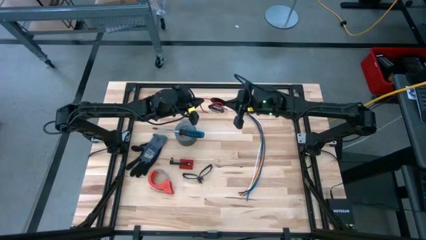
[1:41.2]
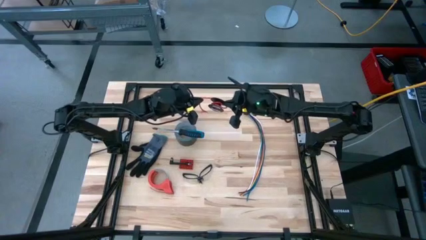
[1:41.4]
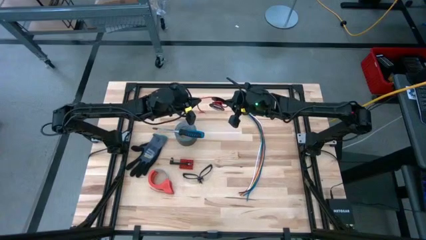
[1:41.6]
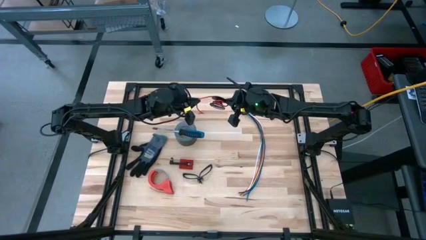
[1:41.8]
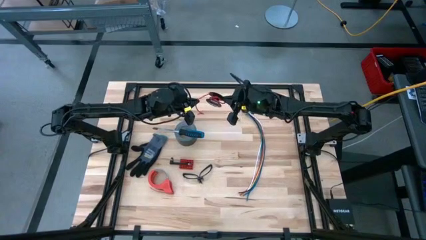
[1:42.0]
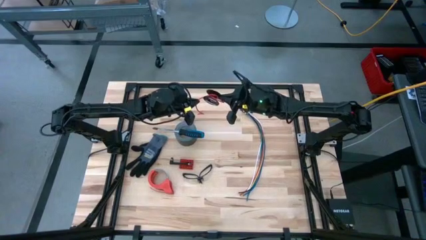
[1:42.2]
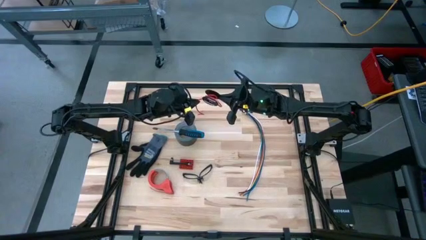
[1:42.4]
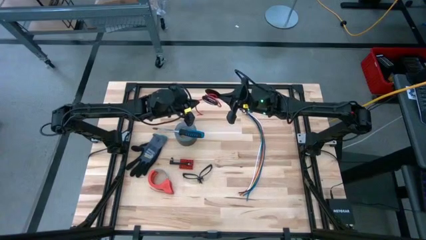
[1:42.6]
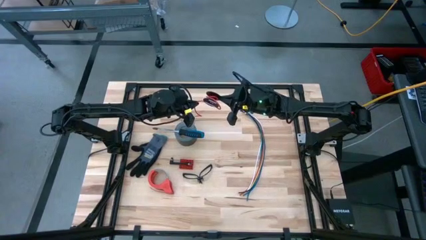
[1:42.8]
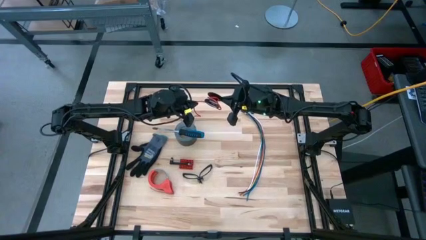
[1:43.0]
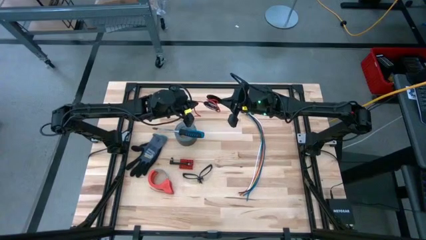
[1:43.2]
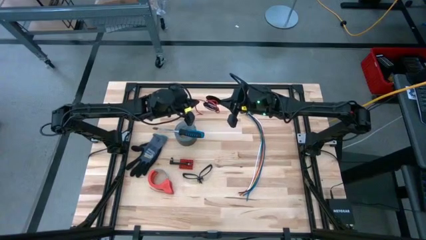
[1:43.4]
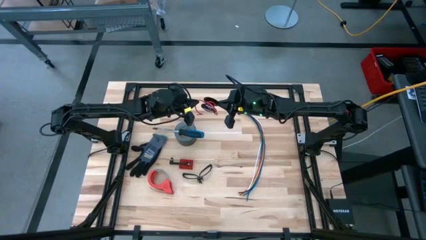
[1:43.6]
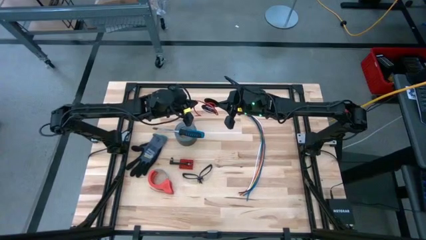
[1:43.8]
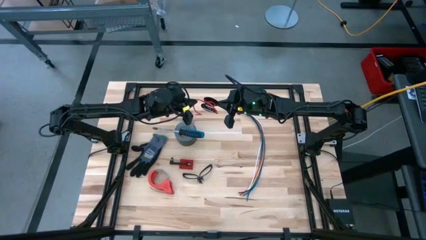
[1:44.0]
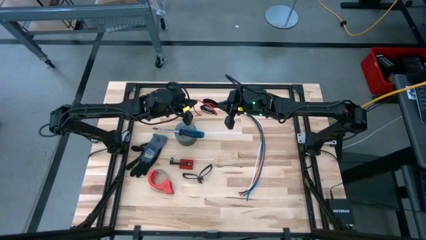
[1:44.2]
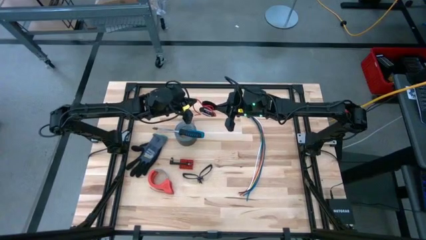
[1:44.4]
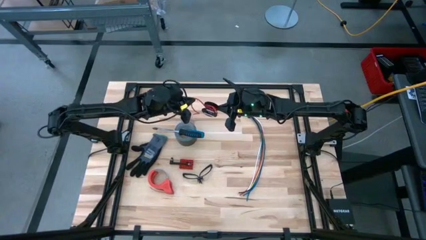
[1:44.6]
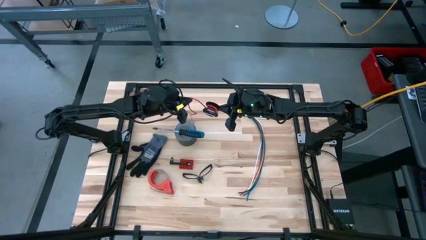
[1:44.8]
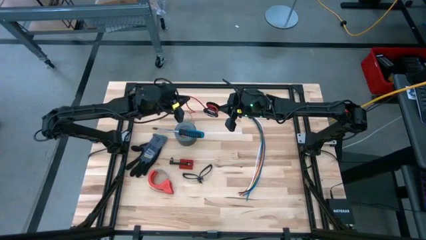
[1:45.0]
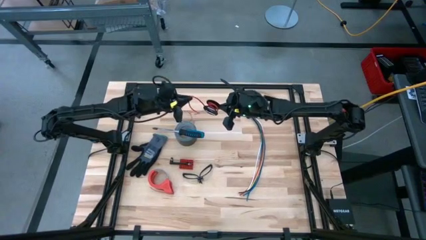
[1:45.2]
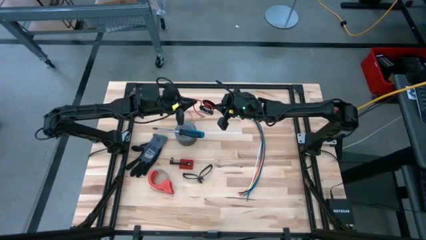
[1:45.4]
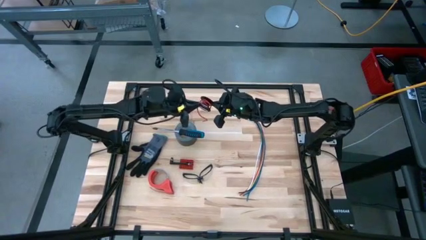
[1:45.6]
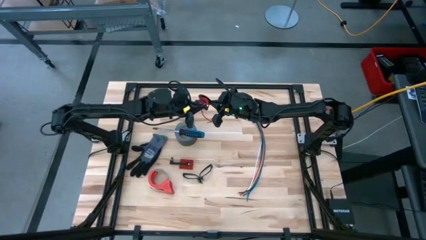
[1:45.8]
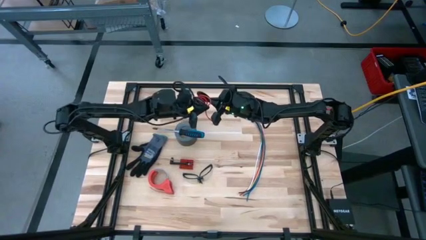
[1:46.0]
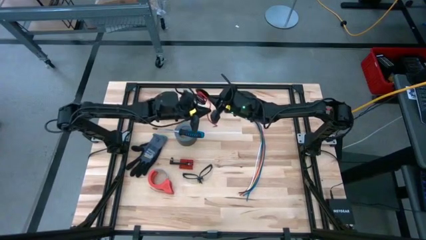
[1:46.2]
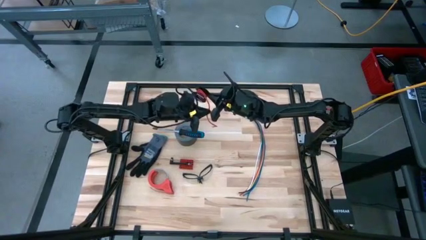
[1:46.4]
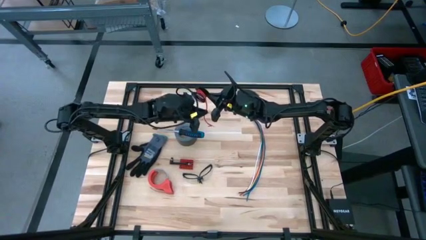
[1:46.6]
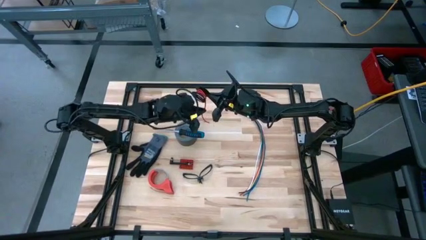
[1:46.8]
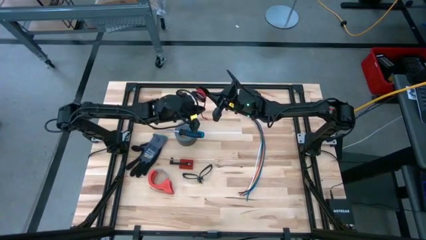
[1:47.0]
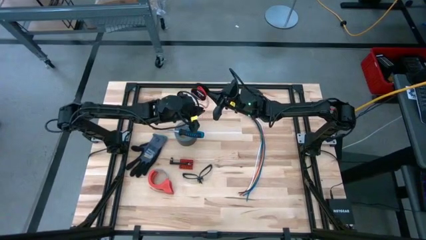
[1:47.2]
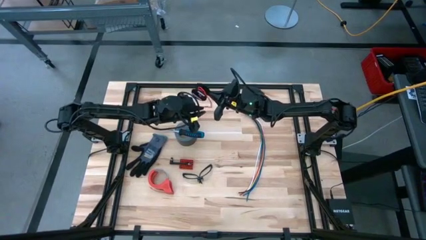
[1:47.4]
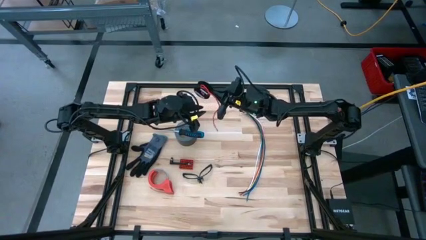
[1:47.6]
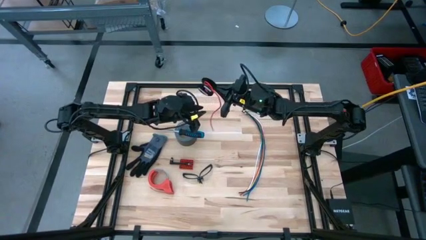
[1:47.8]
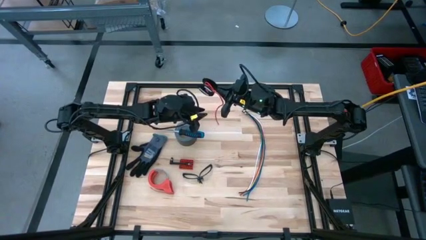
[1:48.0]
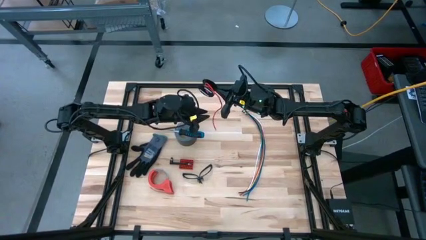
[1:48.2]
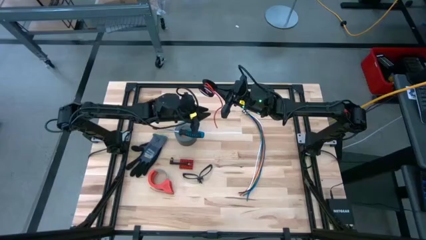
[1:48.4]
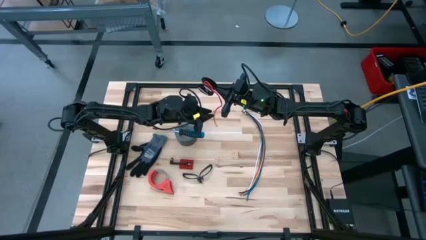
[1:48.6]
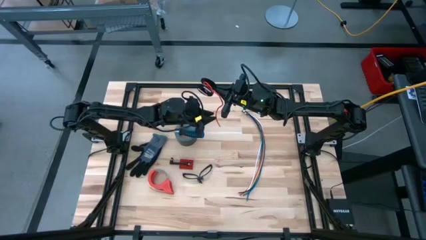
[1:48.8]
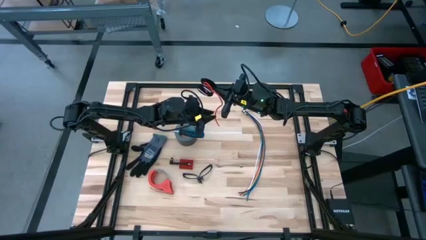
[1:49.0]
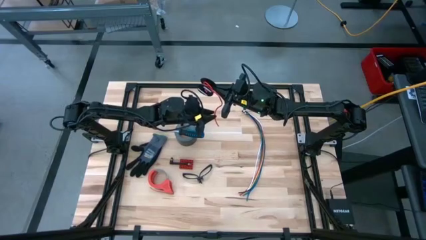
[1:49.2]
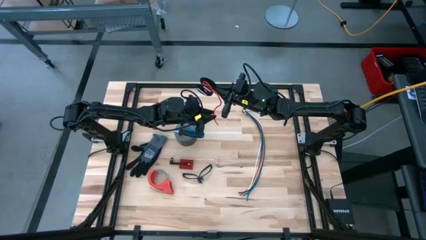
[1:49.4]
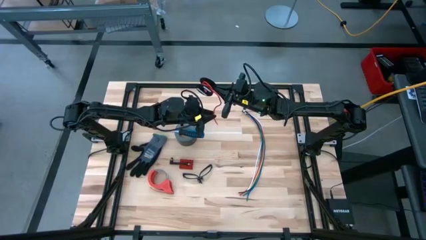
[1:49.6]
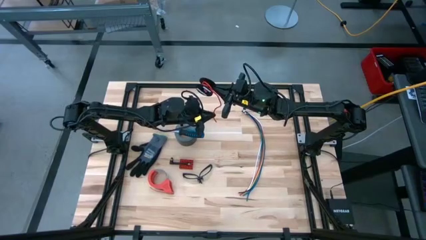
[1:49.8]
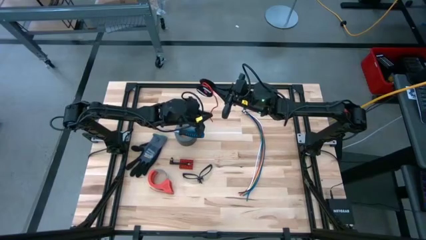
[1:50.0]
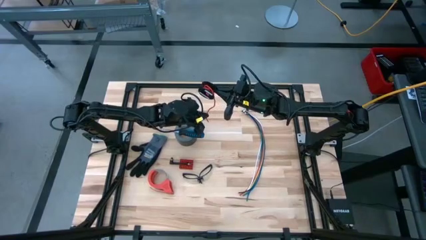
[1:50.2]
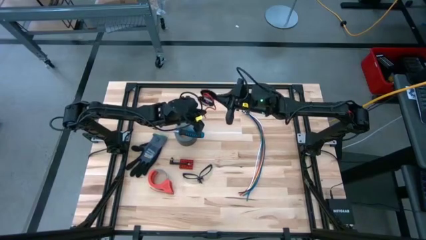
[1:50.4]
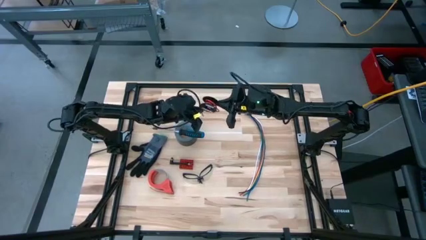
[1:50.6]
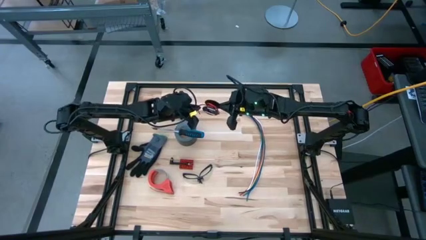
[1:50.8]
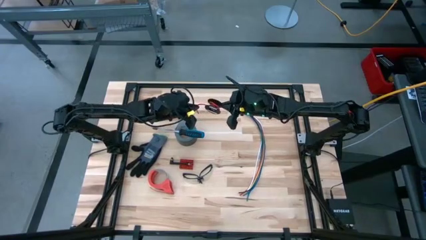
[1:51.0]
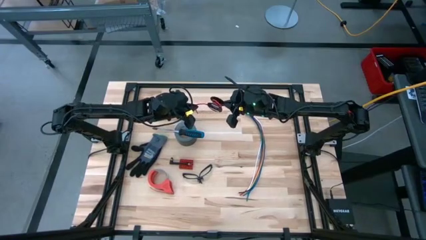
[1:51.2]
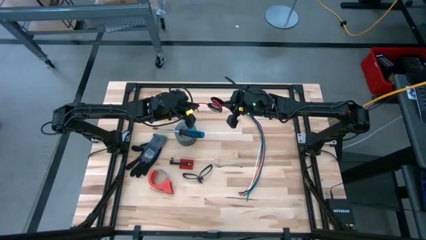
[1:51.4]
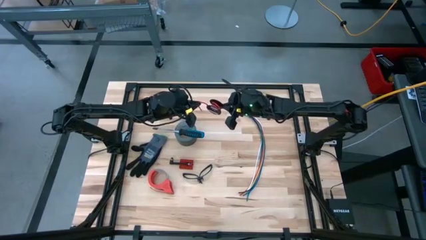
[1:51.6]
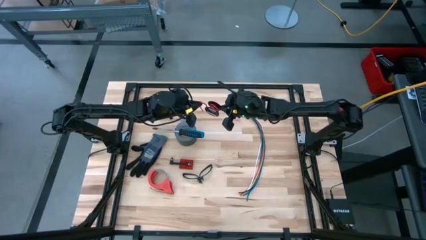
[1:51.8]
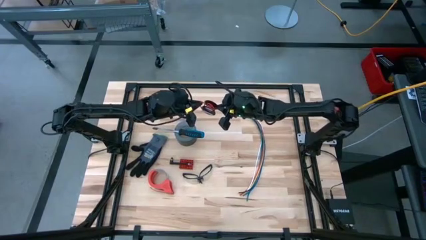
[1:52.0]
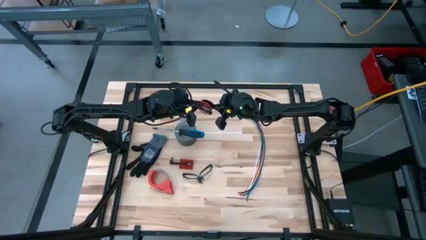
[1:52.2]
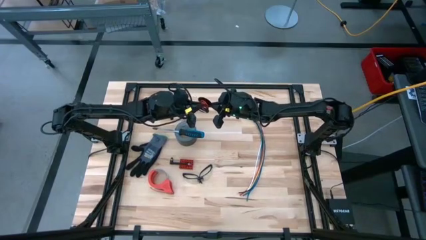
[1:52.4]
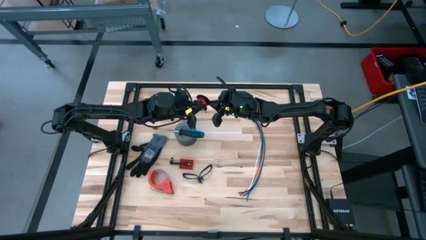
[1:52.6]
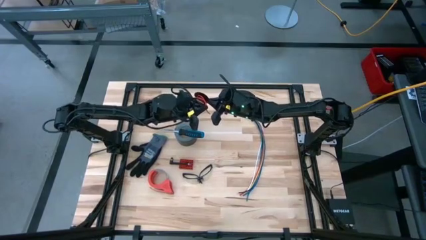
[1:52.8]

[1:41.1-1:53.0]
Task: Coil cords
Coil the red wire into the black spool

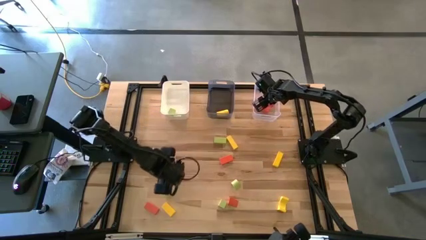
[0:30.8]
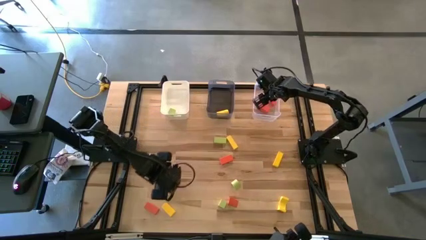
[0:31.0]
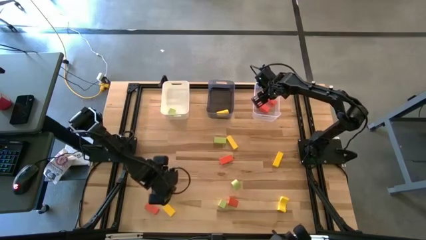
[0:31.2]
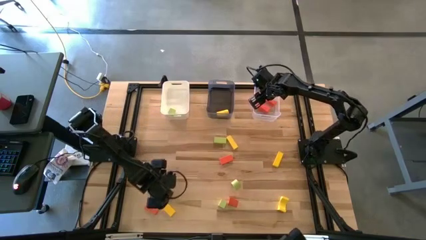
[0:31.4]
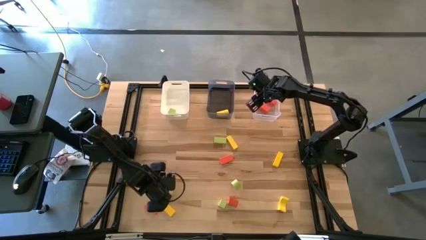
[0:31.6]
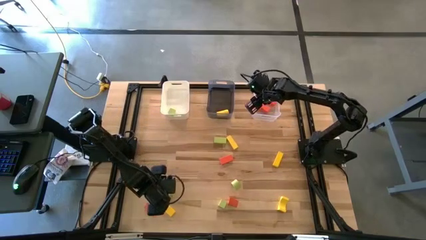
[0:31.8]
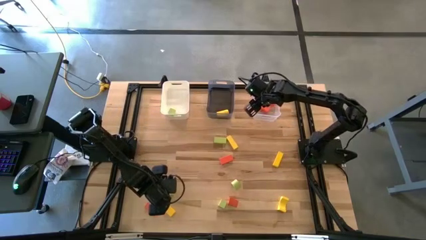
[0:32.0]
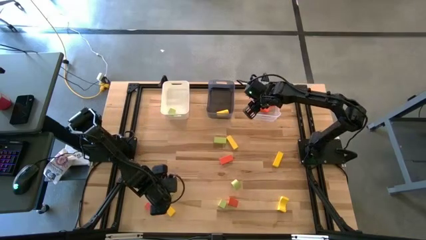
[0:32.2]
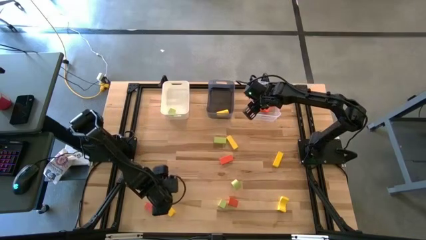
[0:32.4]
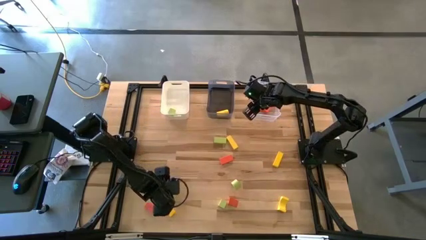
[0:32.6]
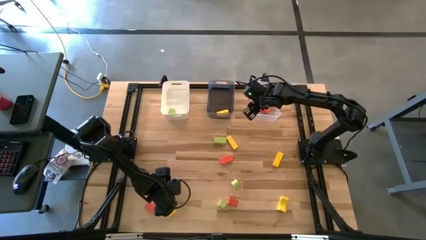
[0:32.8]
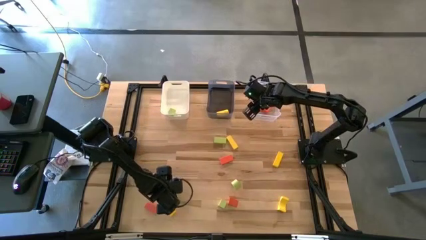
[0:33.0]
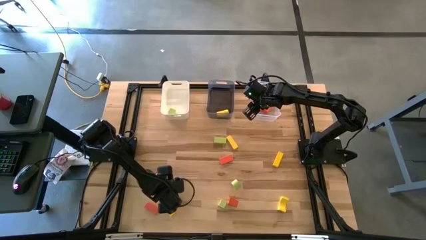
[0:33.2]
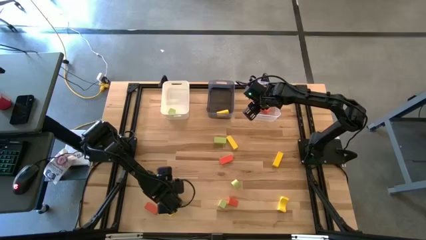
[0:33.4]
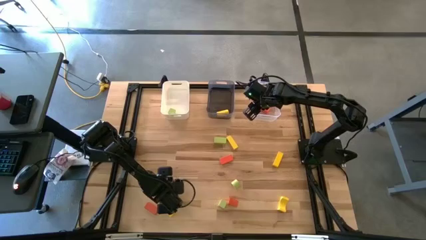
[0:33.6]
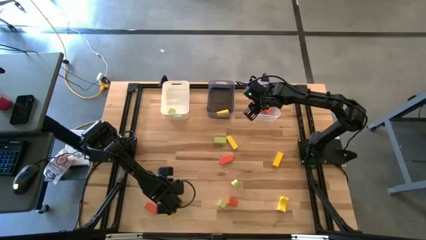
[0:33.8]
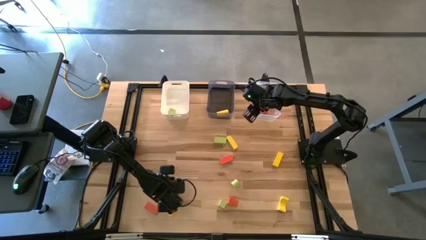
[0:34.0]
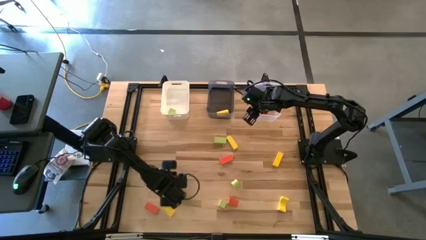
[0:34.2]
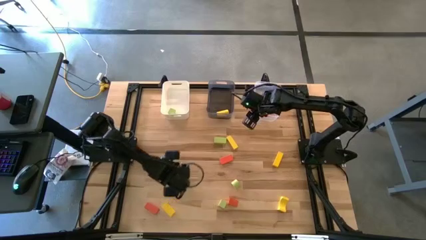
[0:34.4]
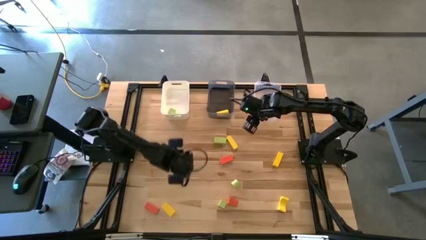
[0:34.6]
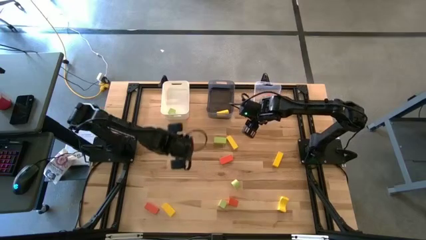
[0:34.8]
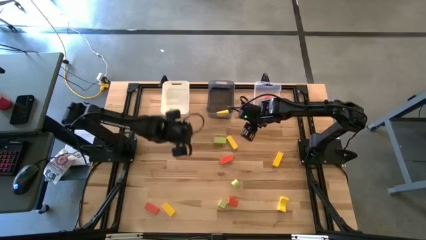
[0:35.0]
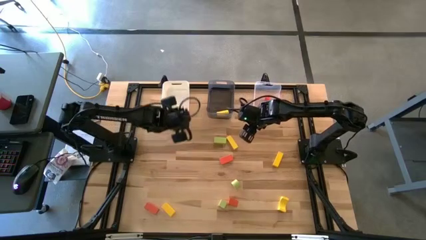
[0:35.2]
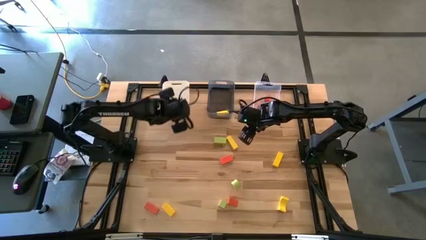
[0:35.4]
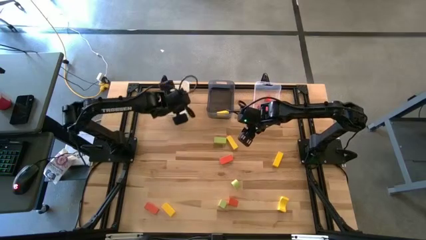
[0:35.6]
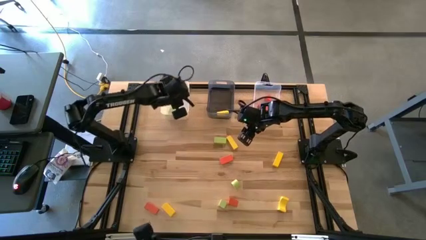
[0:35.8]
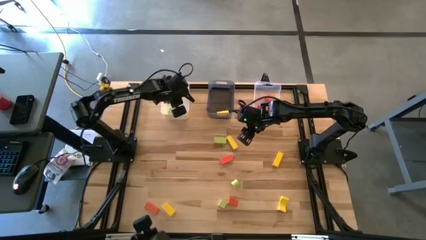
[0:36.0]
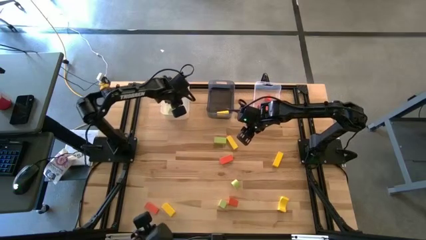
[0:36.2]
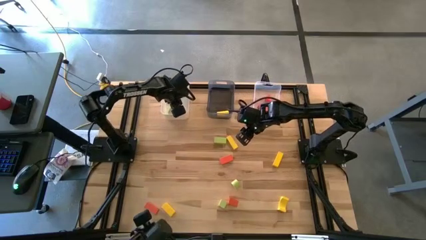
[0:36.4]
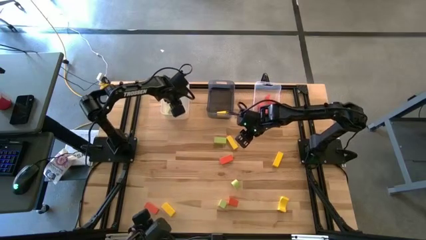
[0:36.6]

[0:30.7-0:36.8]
Task: Sort & place blocks by color
Put the green block into the white bin
